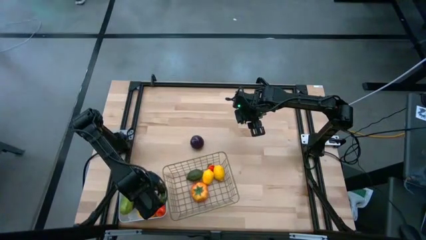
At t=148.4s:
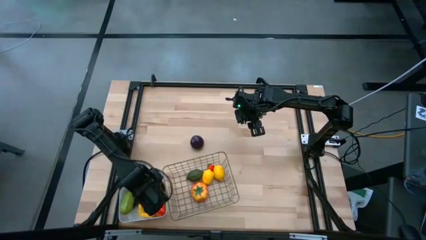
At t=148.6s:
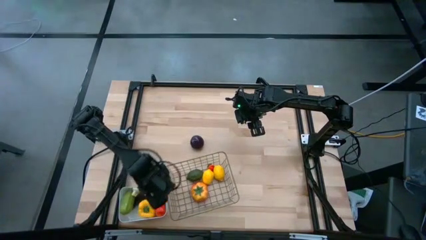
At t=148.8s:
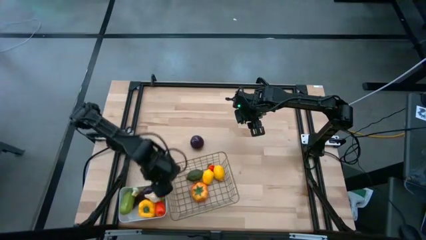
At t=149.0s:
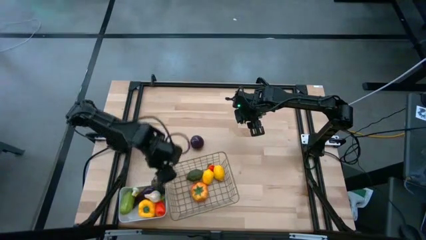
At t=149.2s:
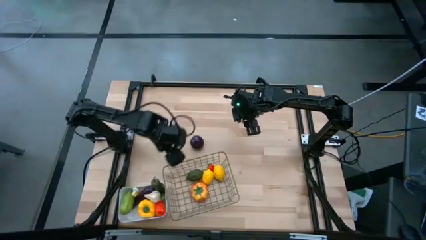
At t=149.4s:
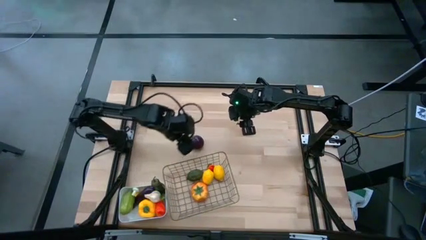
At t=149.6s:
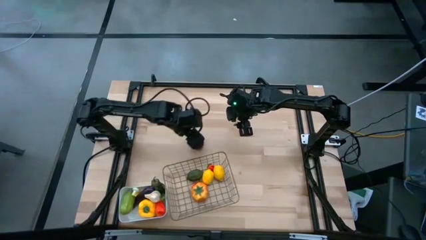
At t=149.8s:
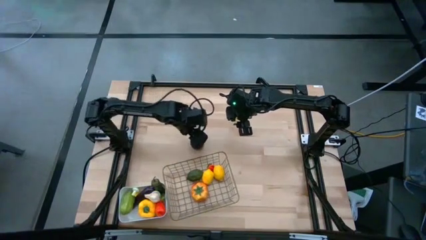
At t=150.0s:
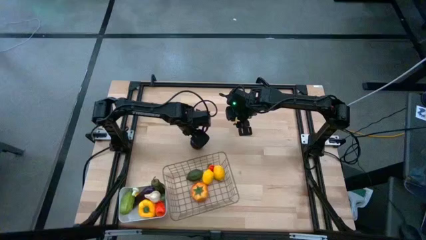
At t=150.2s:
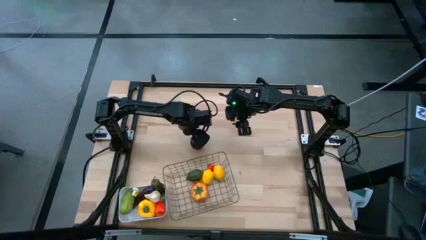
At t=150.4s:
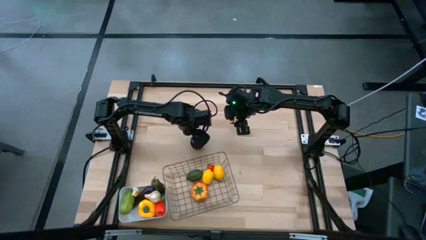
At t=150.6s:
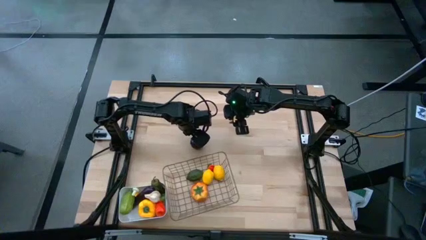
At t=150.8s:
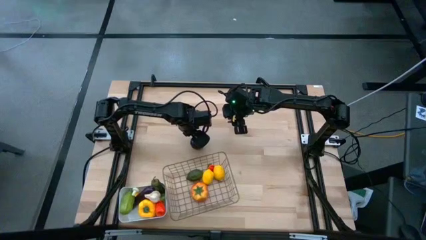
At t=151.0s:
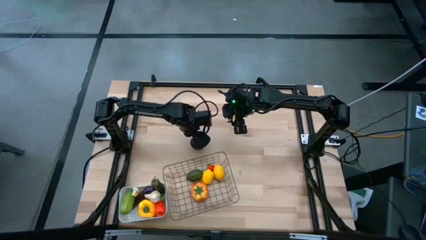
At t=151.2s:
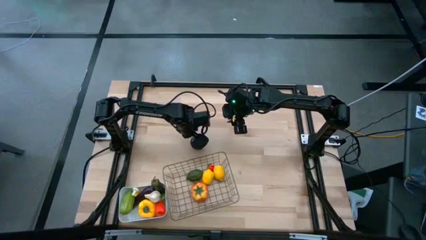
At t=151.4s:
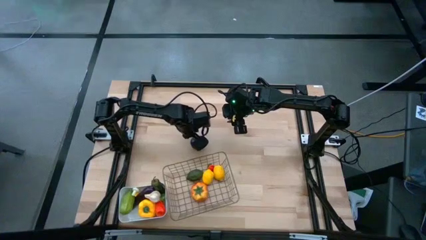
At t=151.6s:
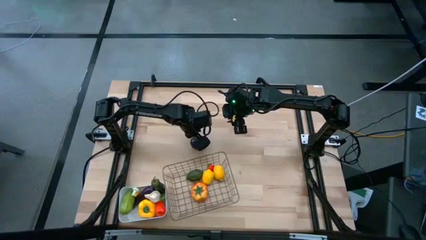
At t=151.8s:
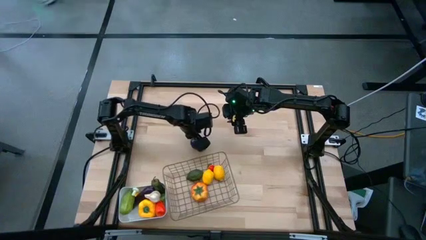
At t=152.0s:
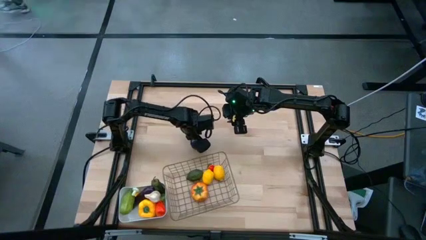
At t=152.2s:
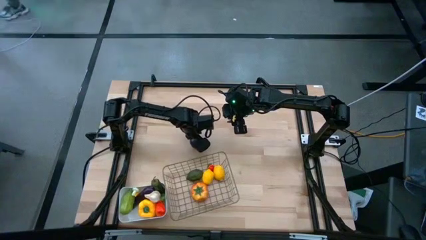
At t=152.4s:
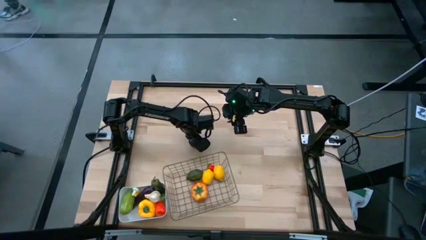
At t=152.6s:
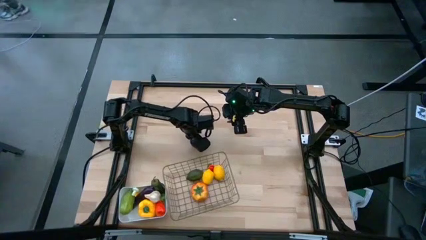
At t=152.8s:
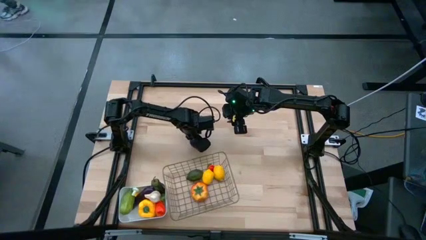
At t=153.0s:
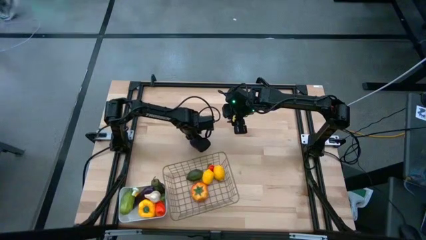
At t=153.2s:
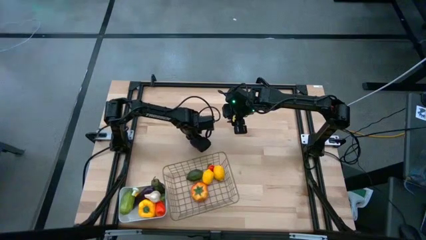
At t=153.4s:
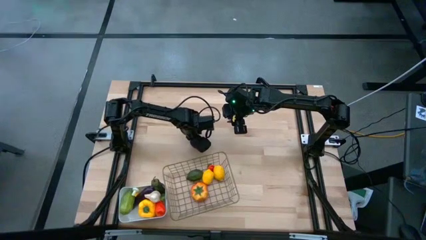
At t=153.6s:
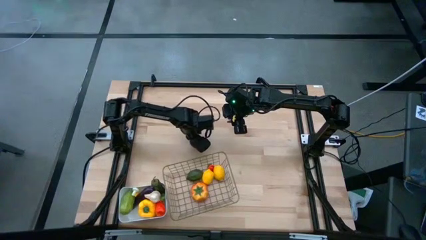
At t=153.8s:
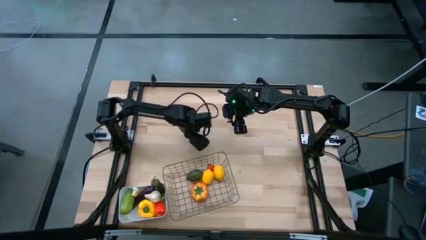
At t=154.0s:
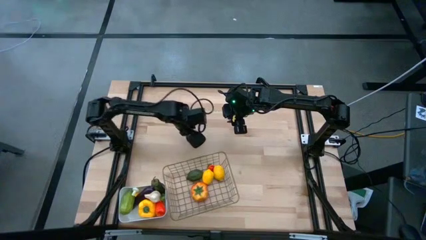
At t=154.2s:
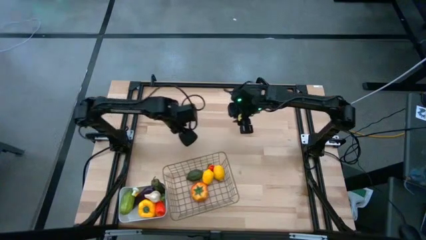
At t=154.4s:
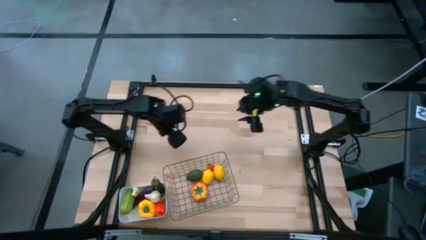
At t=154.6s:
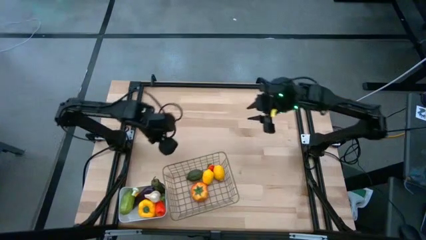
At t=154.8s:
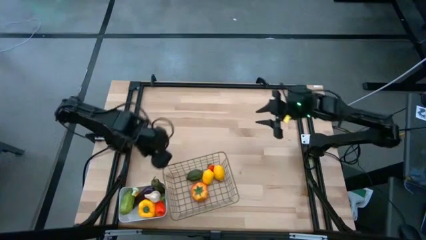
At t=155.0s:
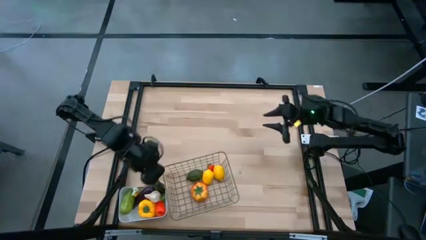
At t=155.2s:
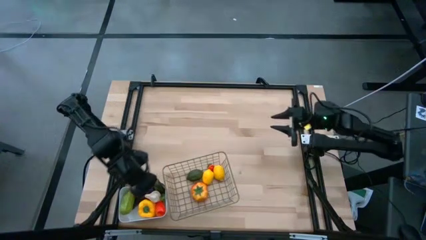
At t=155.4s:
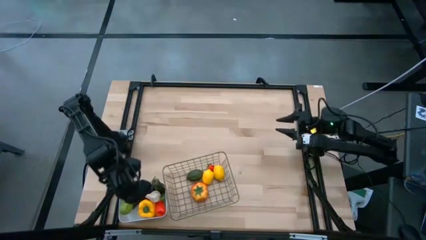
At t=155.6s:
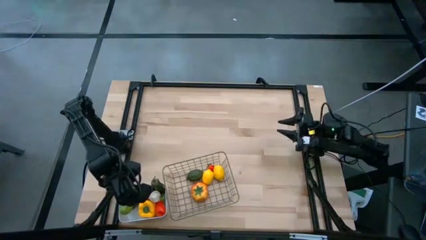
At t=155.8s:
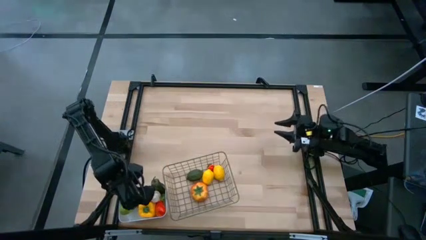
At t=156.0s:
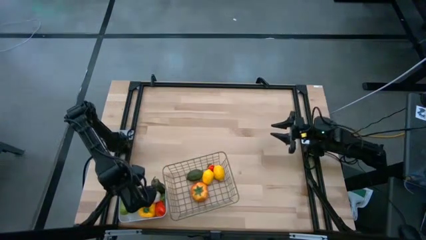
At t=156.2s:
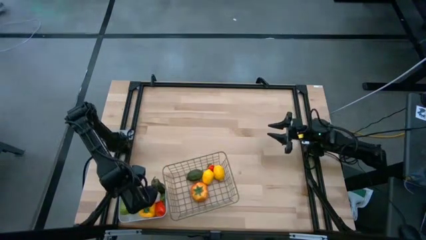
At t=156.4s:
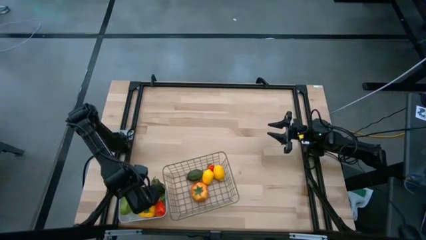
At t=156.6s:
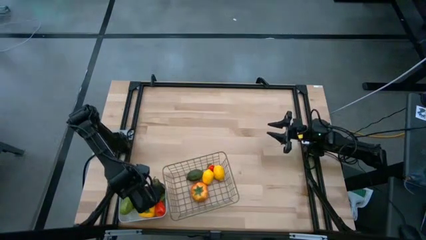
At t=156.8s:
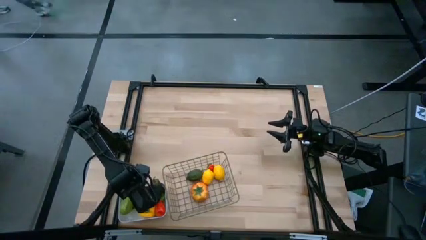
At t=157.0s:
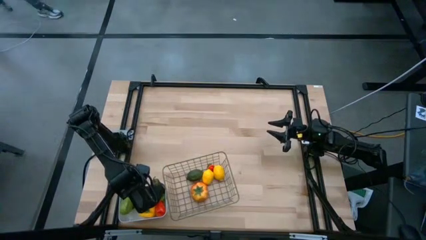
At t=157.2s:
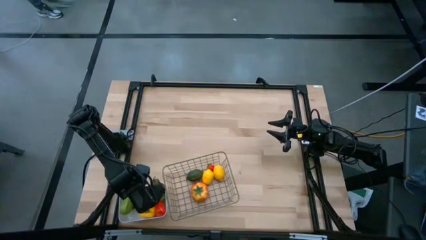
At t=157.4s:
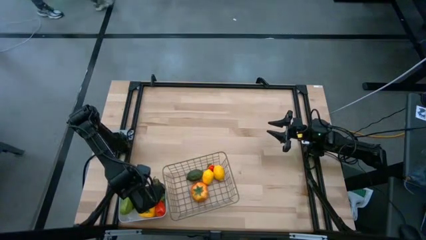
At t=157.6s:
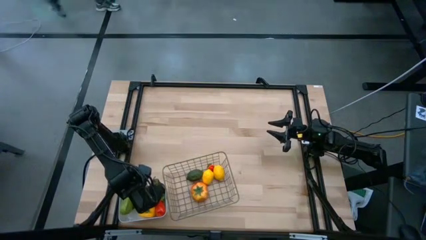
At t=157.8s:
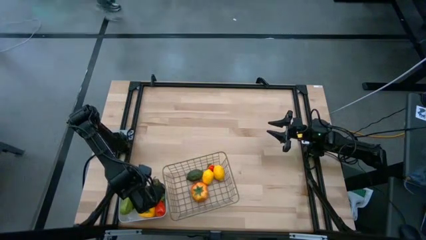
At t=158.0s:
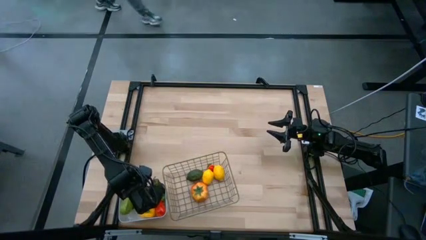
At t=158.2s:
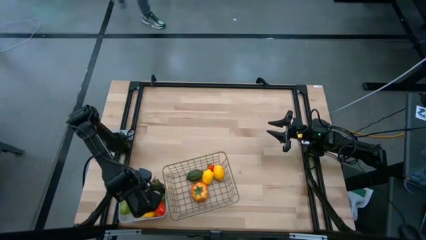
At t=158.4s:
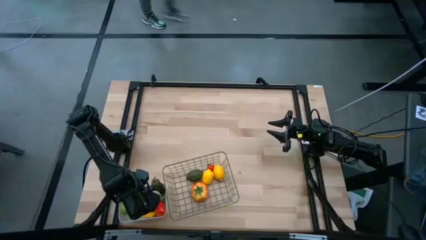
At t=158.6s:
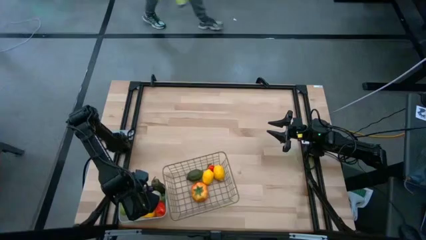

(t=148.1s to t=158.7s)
Task: Sort produce into baskets
Put the black plum into the white bin

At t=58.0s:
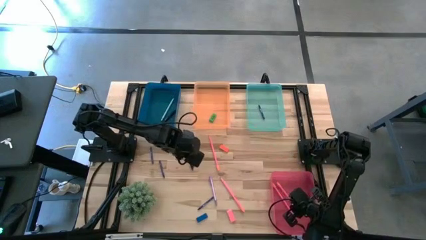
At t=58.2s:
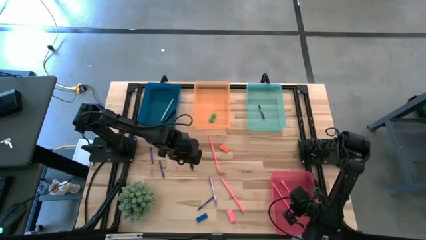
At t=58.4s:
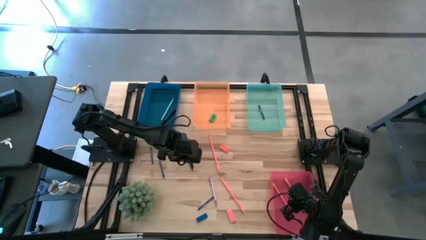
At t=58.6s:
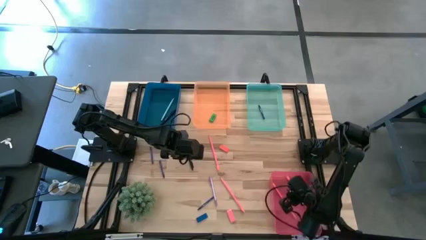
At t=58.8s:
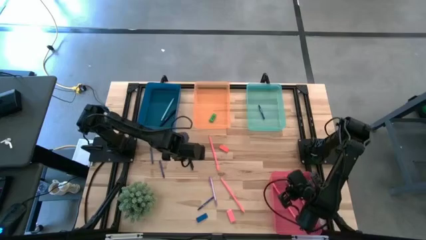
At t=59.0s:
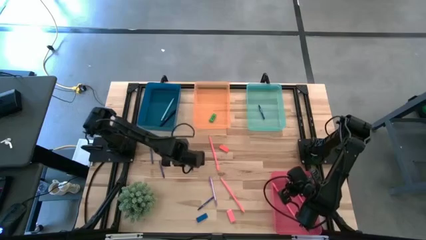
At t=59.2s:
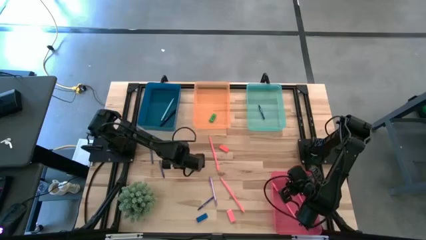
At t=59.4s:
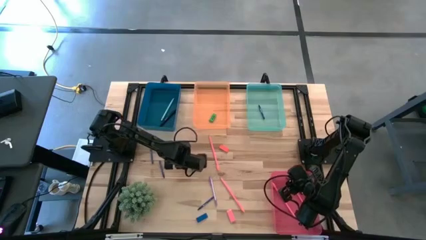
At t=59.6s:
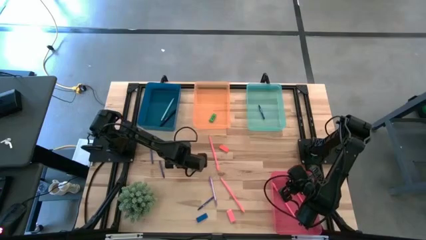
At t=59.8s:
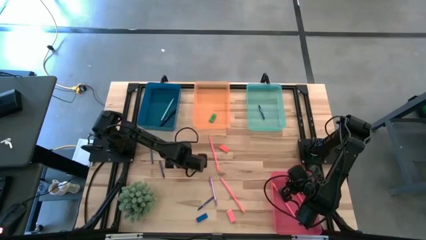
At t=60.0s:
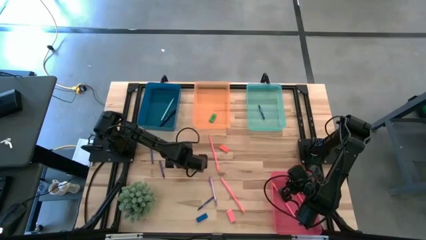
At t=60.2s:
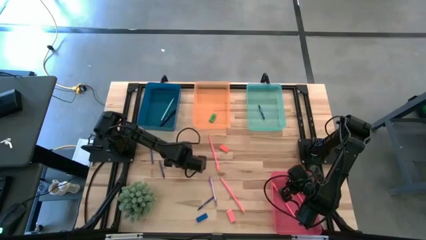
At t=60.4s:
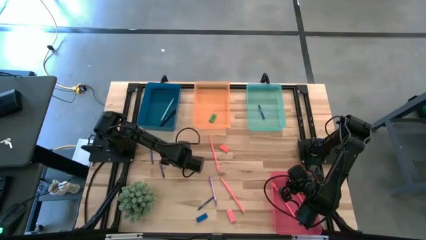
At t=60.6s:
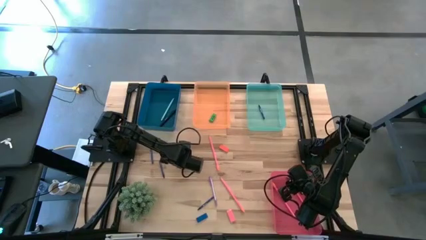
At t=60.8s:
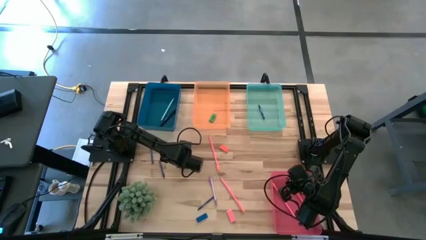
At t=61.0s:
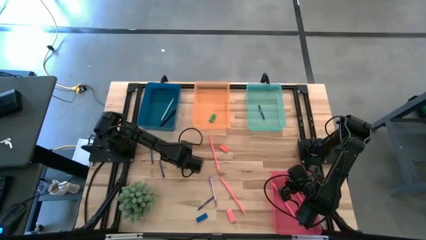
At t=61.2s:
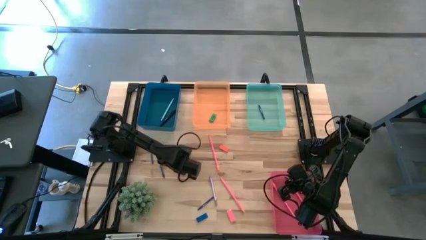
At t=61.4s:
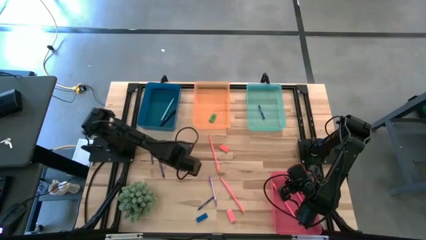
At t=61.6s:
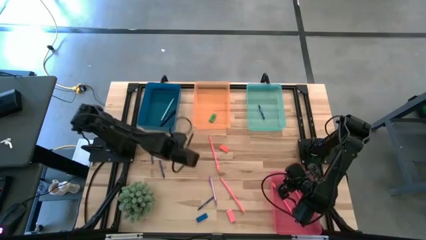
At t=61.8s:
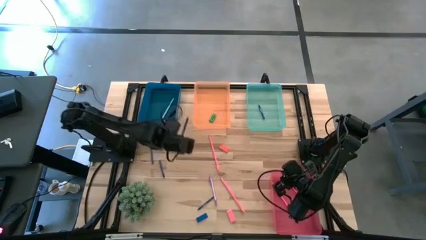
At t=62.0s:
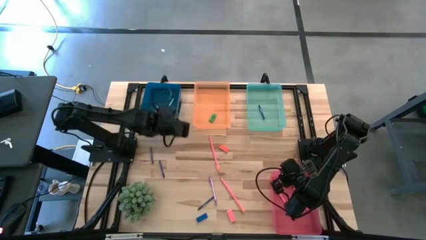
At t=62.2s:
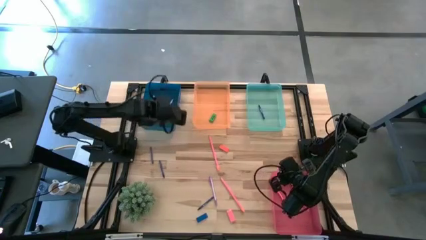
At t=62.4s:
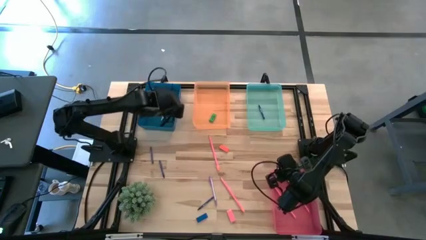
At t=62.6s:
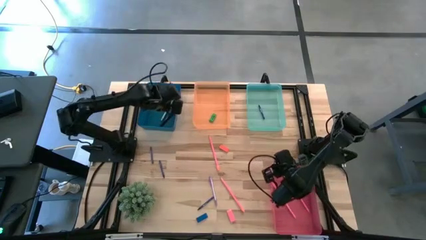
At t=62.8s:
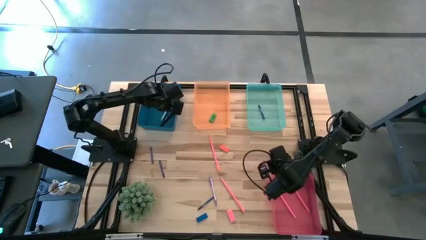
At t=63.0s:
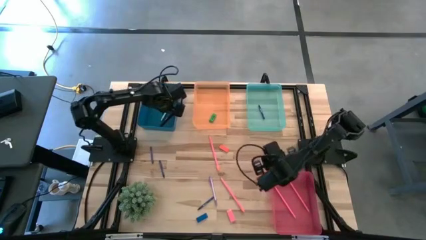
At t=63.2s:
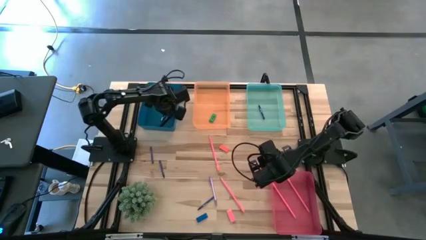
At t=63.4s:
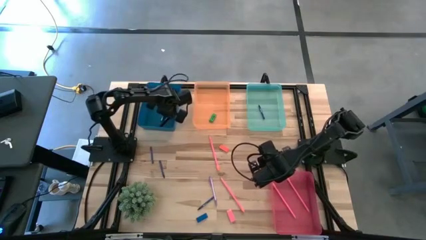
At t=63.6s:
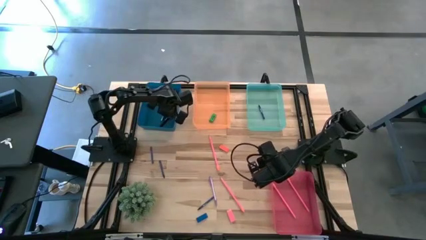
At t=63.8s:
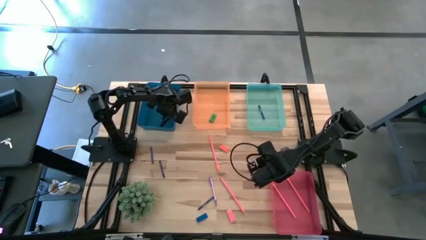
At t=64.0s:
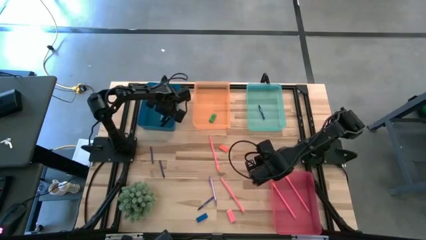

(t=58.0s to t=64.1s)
Task: Sort crayons/erasers/pens/pencils in bins
Put the black pen into the blue bin
